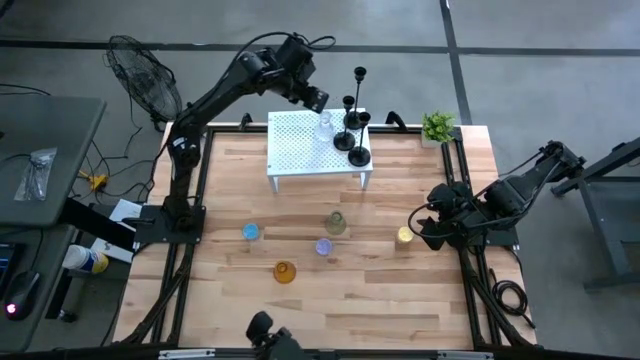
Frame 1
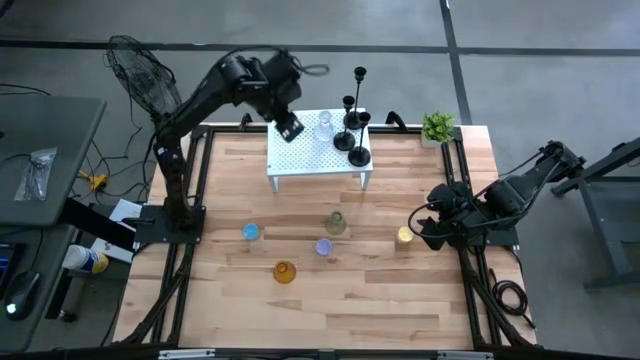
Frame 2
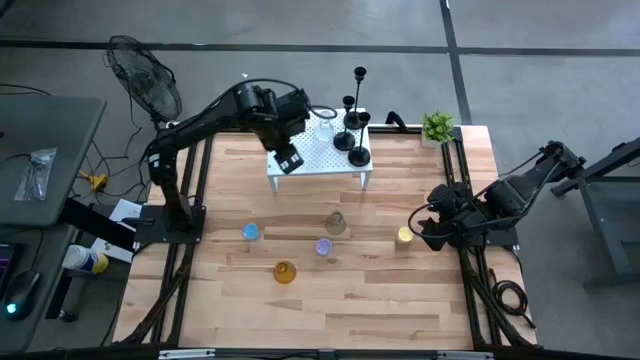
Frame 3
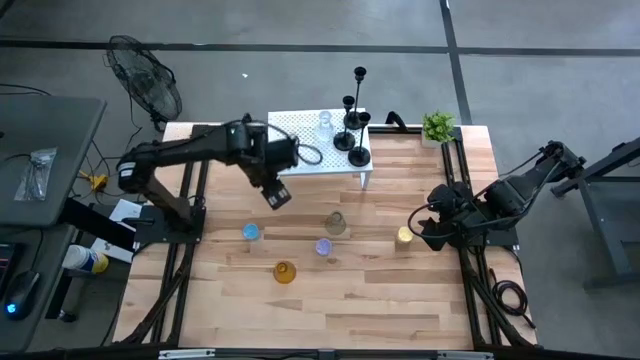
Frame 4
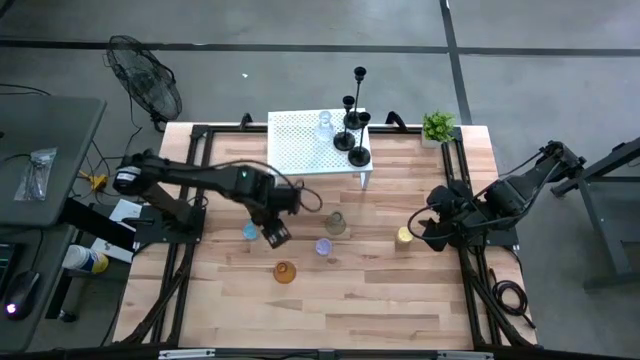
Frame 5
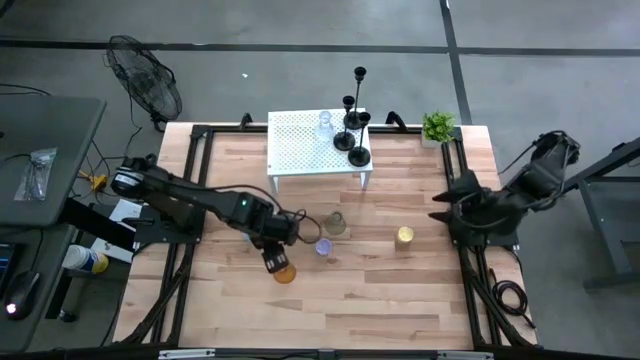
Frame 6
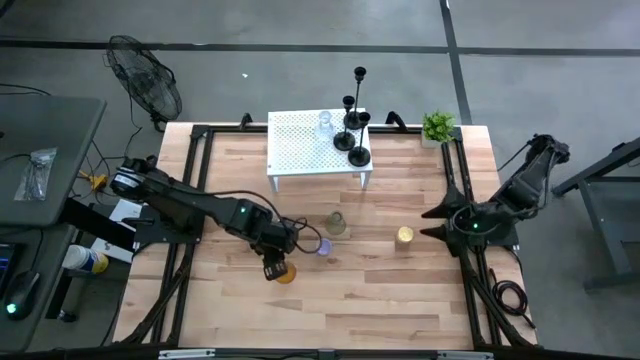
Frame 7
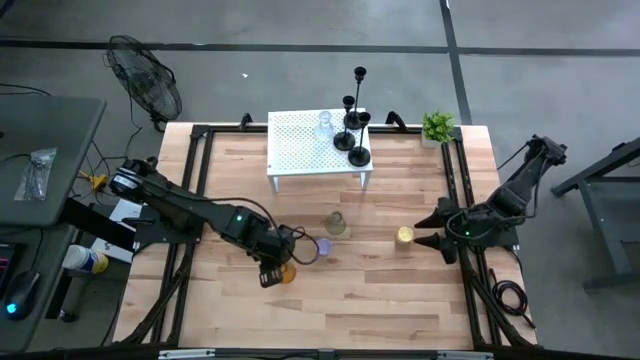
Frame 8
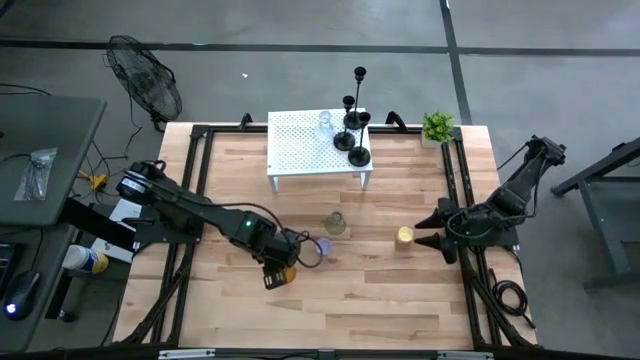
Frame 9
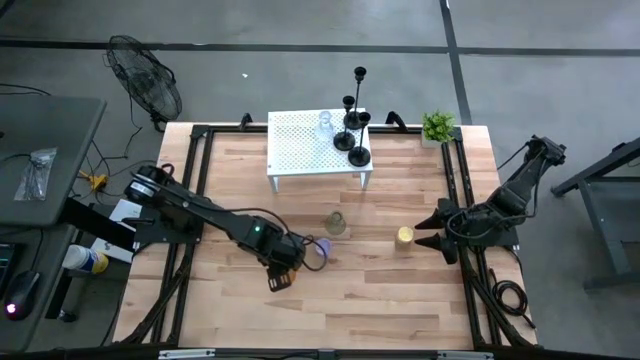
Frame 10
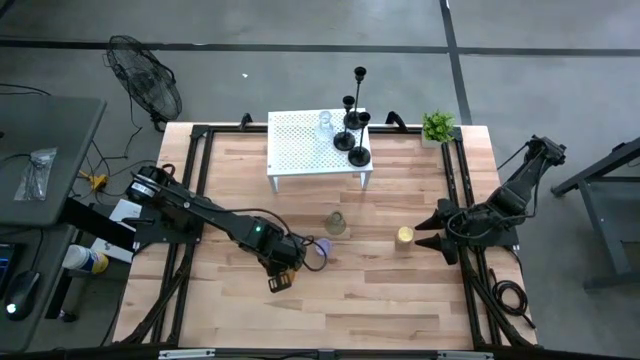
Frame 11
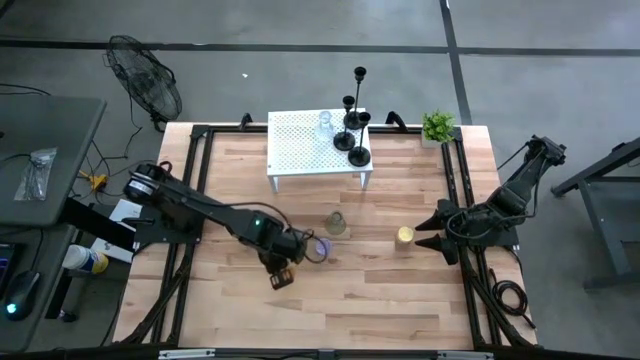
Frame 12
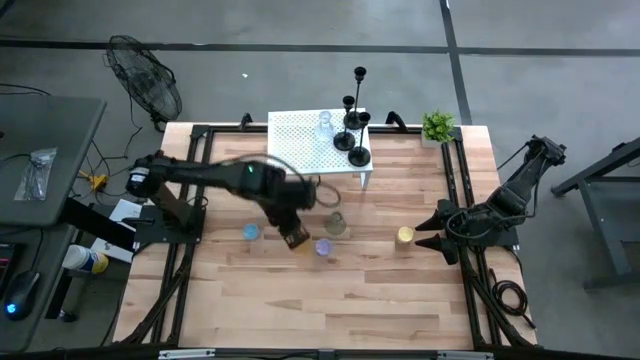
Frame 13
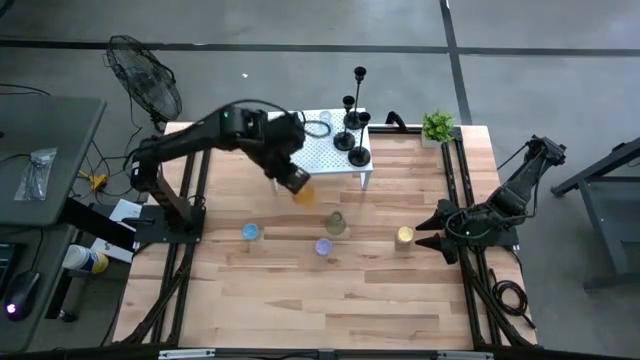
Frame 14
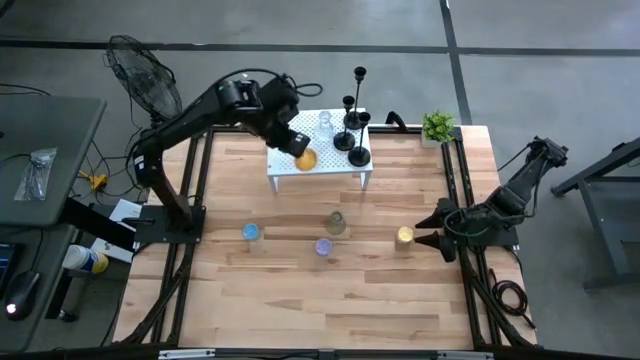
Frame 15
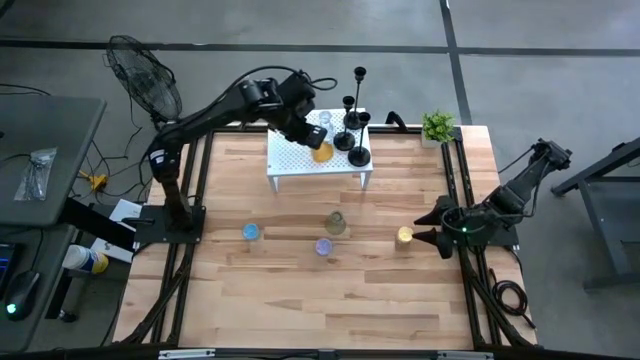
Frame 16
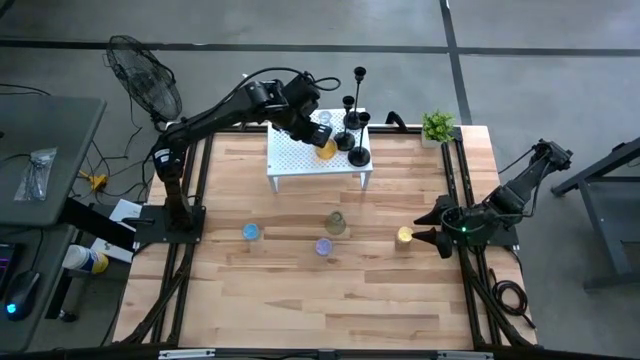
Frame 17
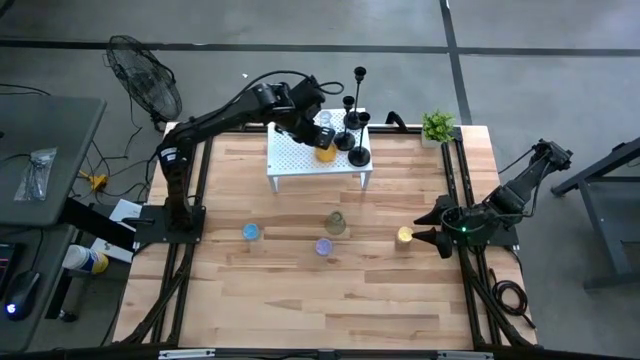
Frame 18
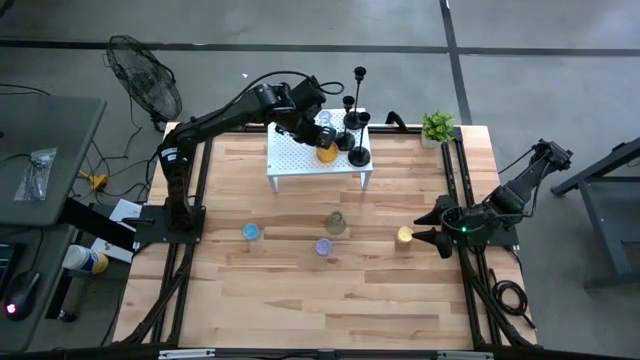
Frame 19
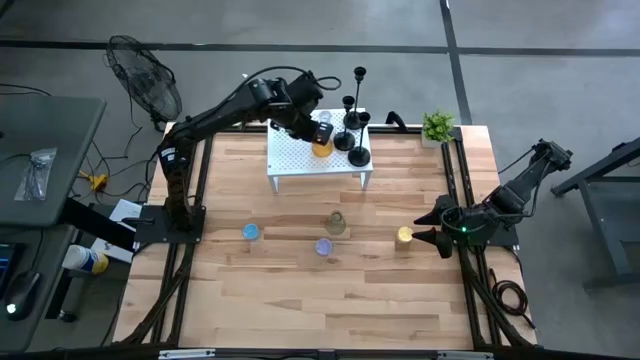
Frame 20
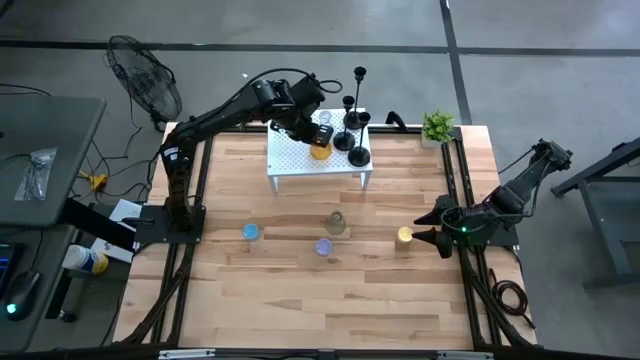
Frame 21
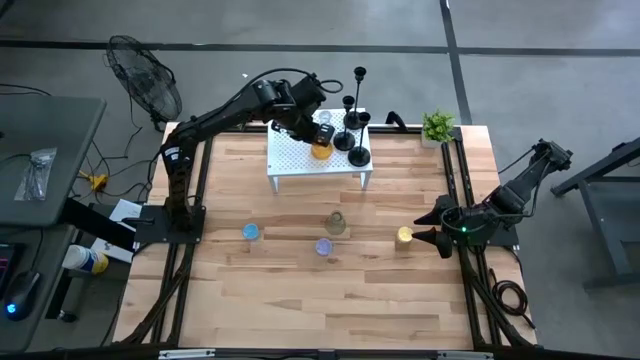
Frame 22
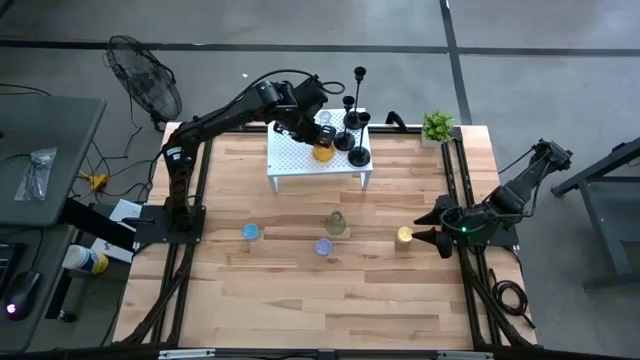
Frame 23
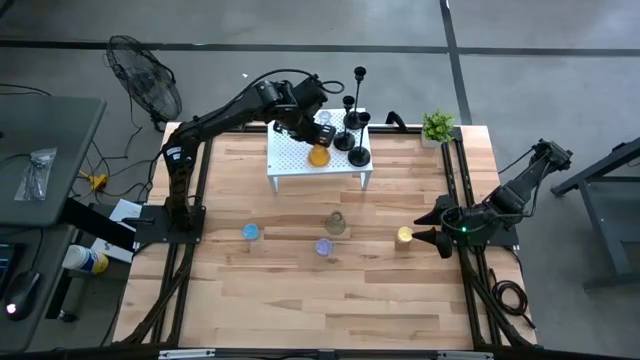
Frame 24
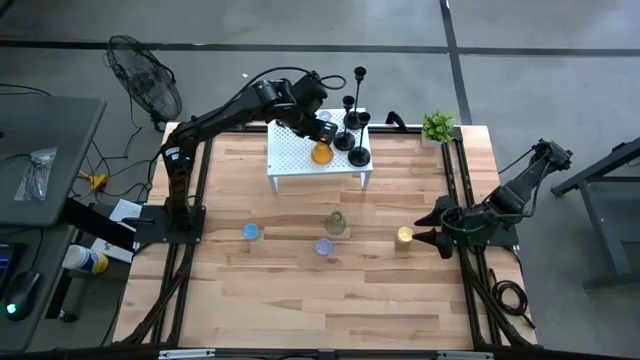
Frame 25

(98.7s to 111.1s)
Task: Pick & Place candle stick holders
Put the yellow candle holder on the shelf

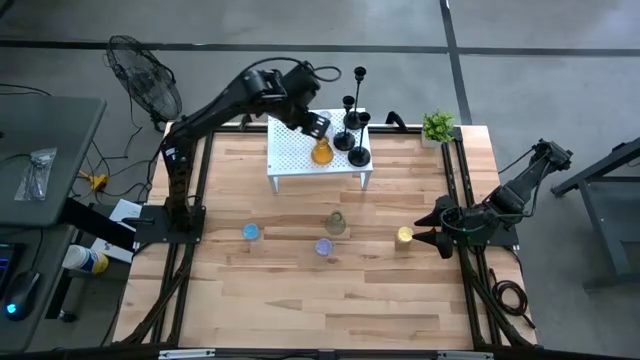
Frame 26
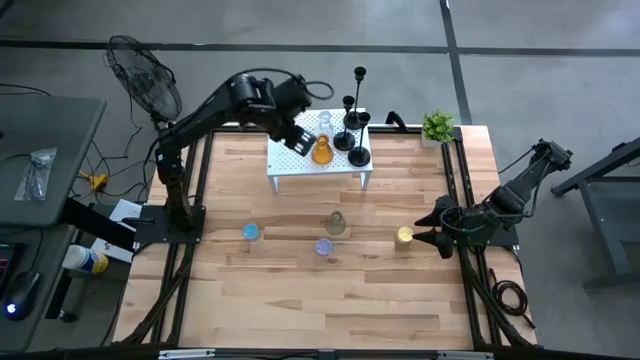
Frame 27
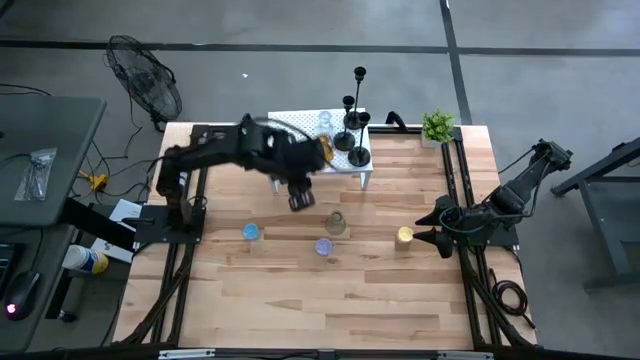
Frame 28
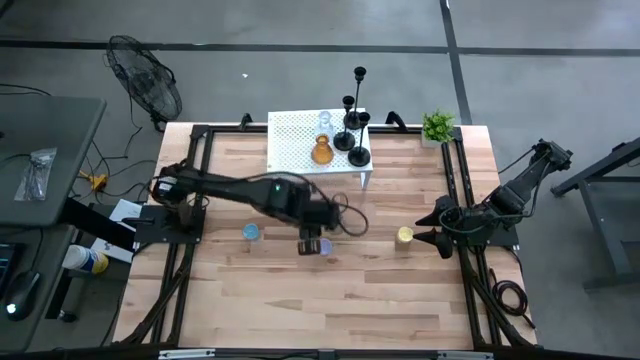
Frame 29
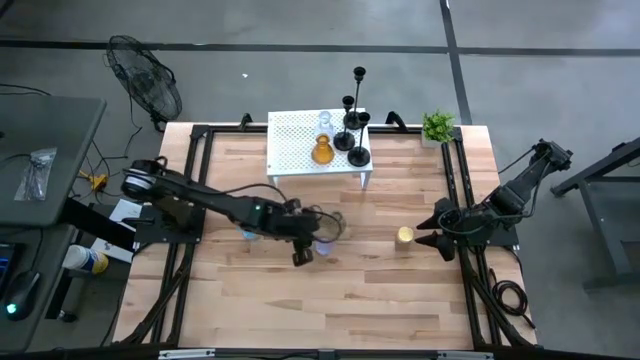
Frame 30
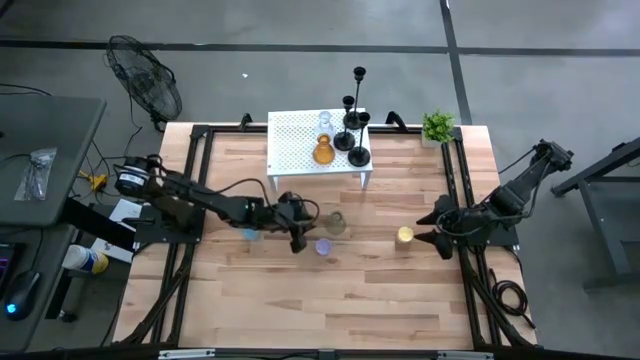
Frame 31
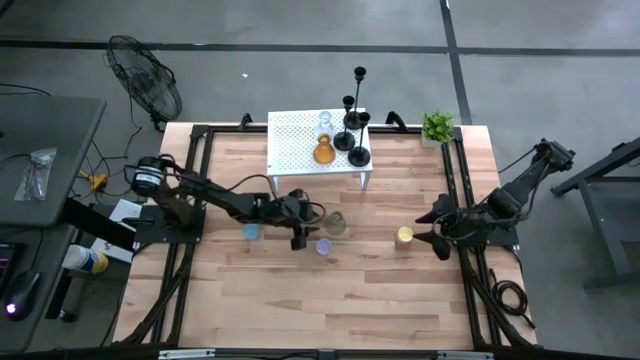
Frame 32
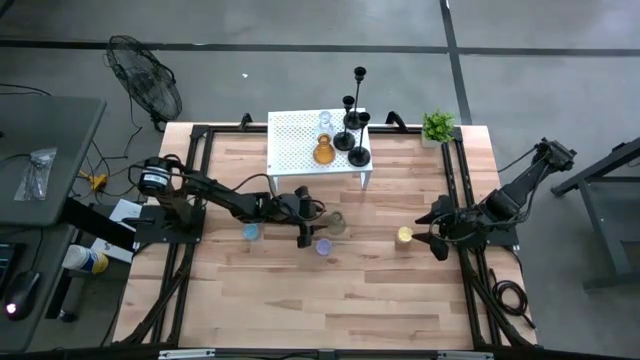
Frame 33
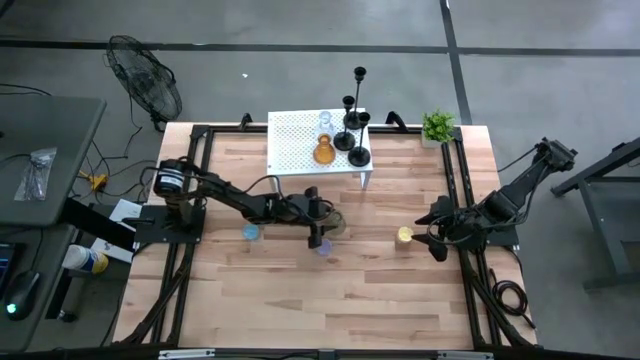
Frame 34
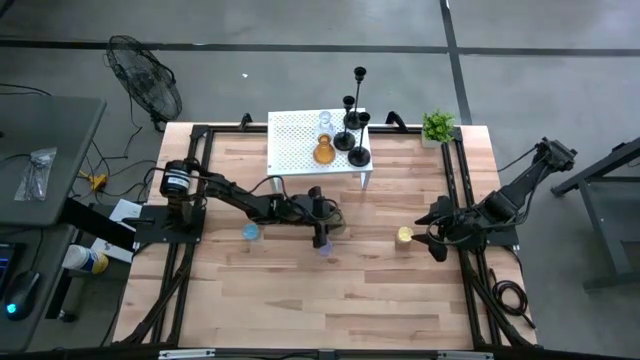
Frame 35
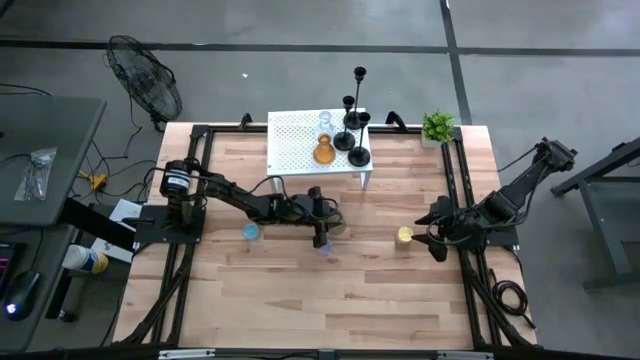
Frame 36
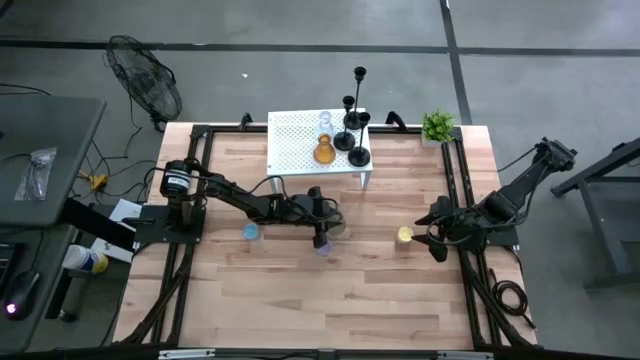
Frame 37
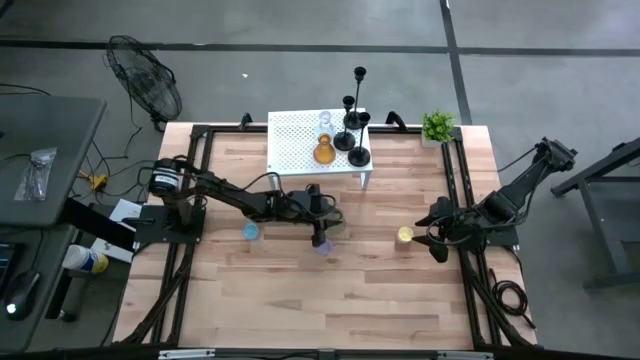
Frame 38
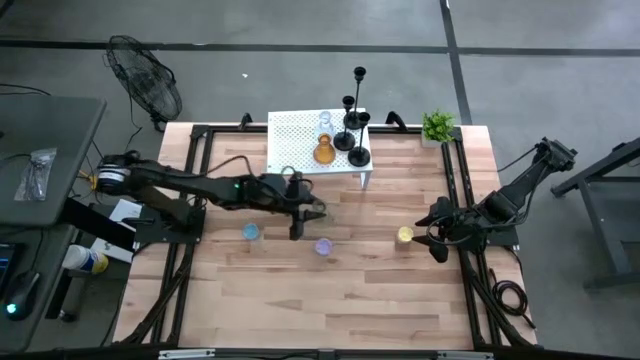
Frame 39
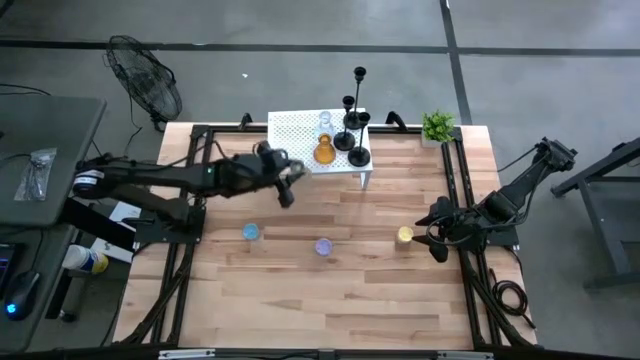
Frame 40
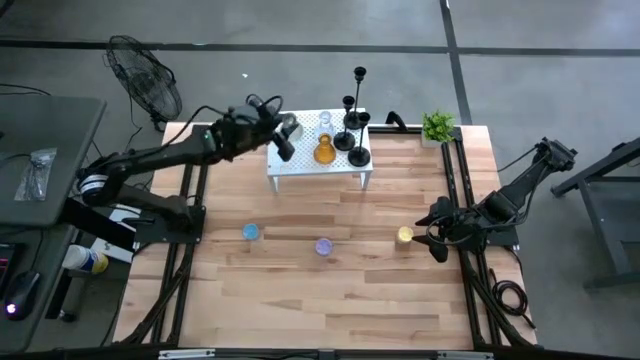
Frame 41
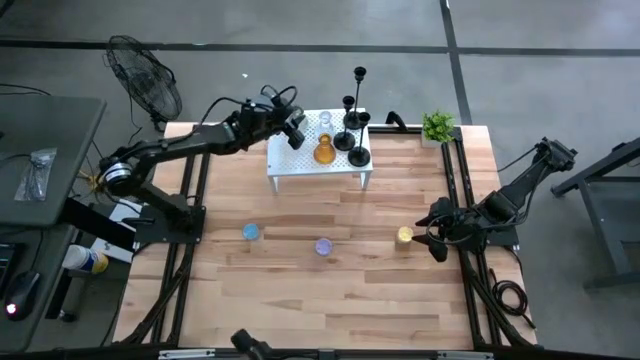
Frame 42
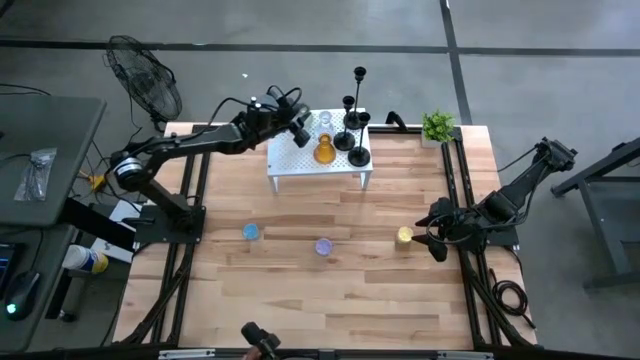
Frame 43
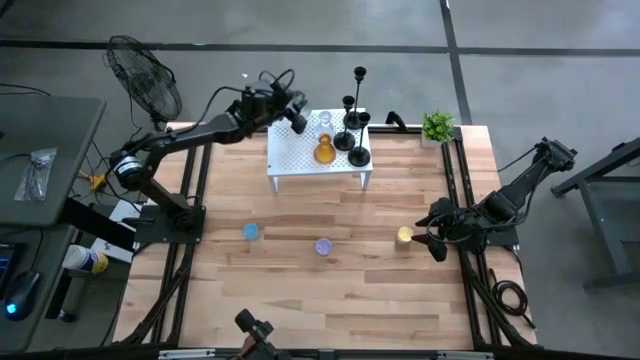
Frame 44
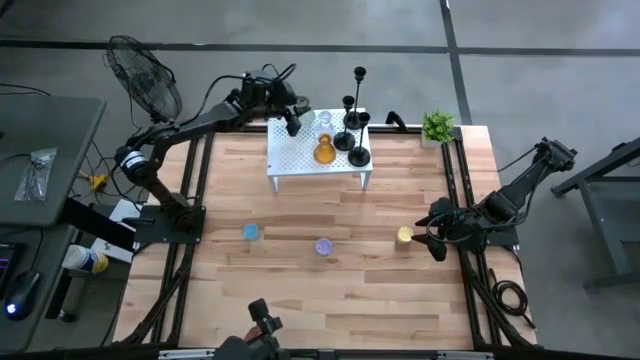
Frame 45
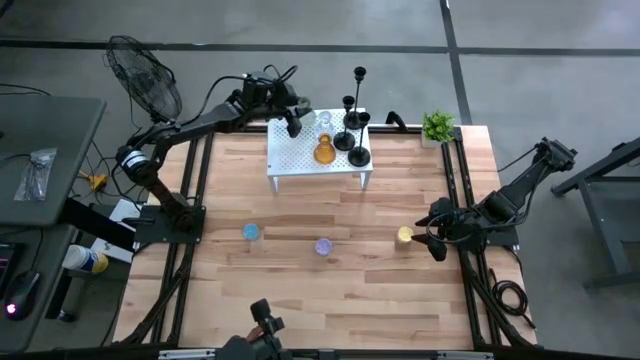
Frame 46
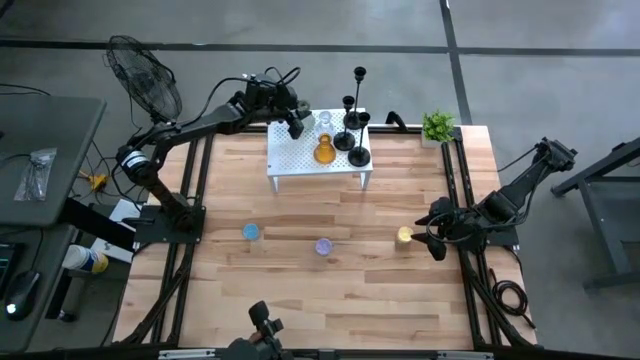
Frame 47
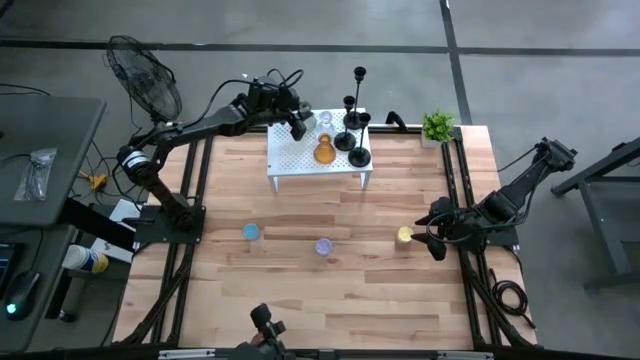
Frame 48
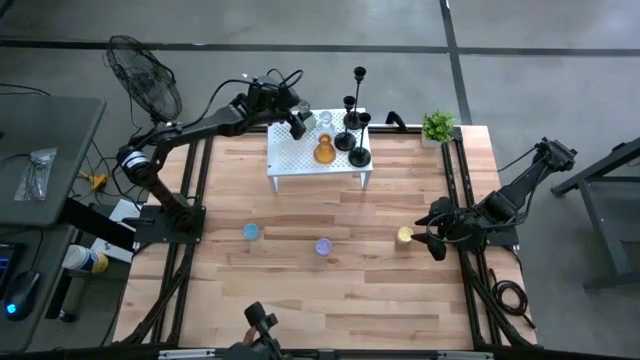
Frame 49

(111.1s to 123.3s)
Put the gray candle holder on the shelf
